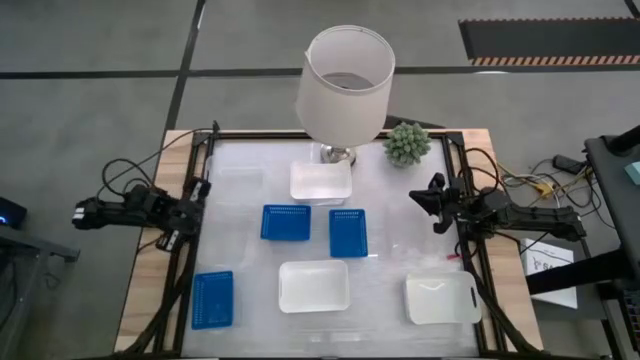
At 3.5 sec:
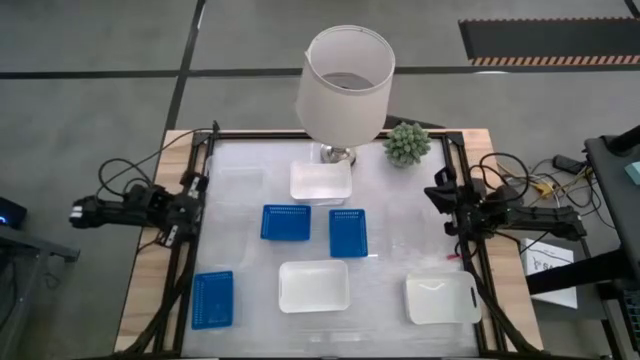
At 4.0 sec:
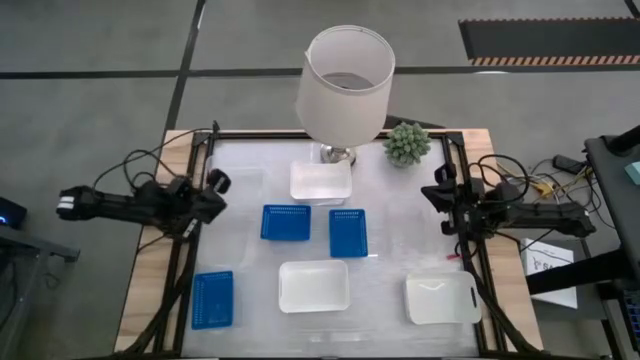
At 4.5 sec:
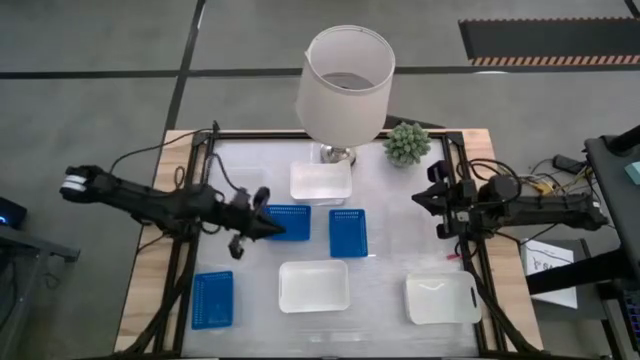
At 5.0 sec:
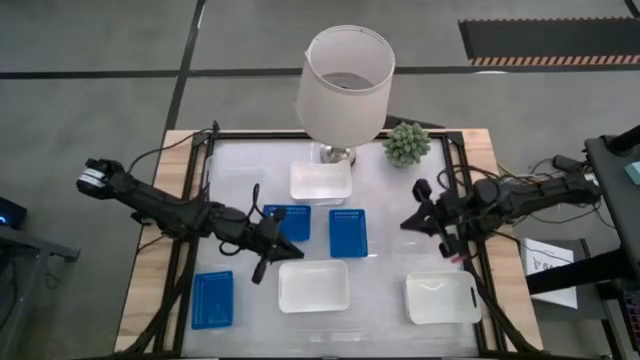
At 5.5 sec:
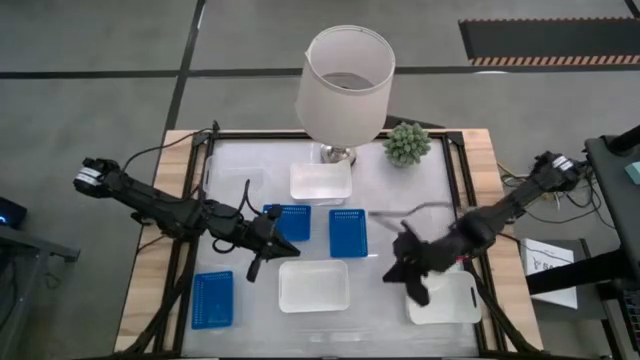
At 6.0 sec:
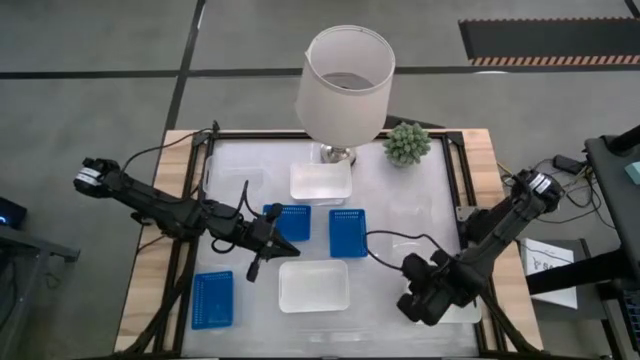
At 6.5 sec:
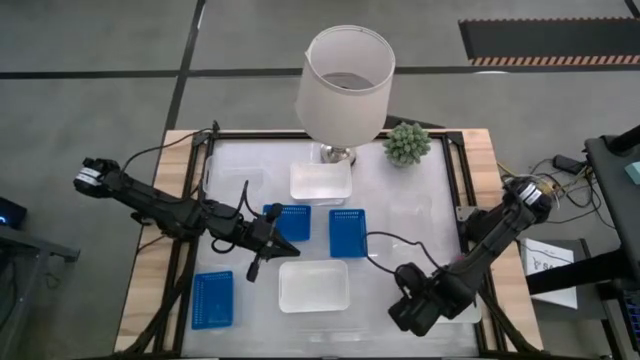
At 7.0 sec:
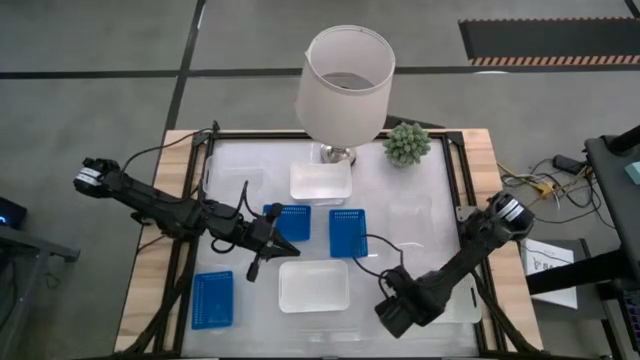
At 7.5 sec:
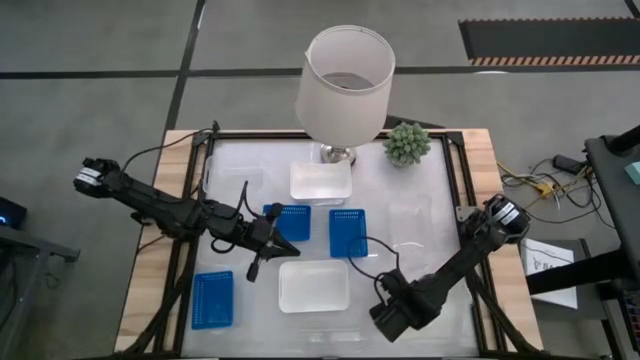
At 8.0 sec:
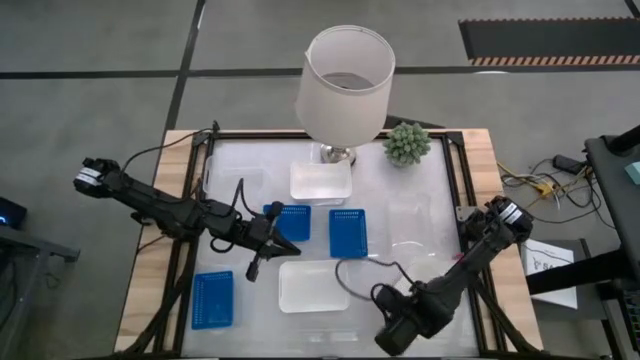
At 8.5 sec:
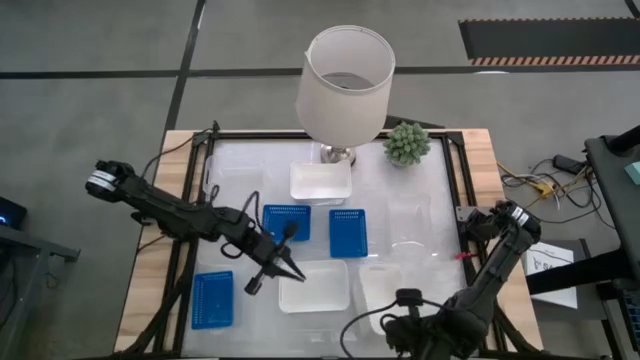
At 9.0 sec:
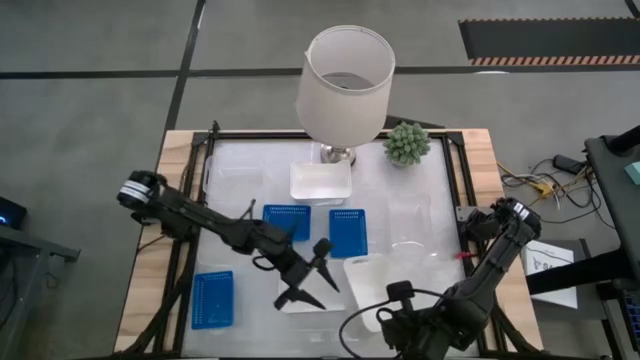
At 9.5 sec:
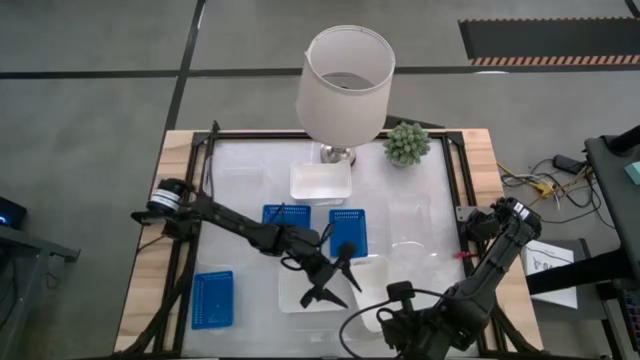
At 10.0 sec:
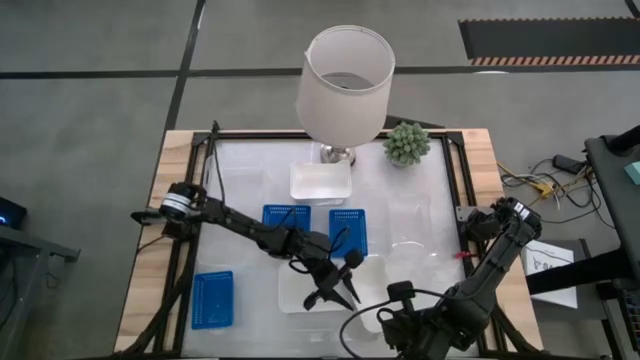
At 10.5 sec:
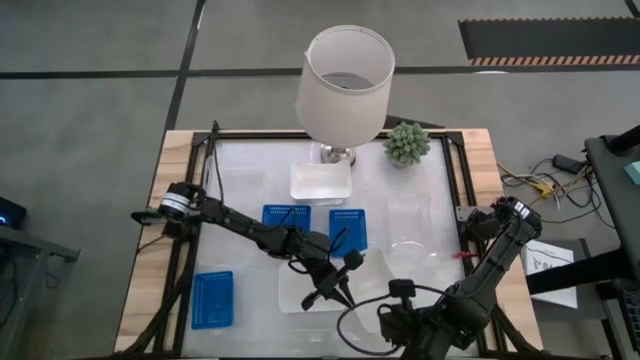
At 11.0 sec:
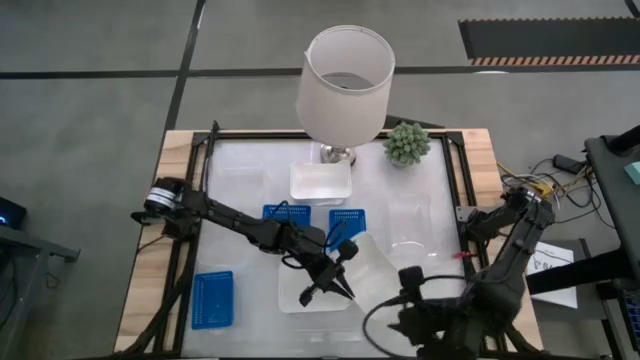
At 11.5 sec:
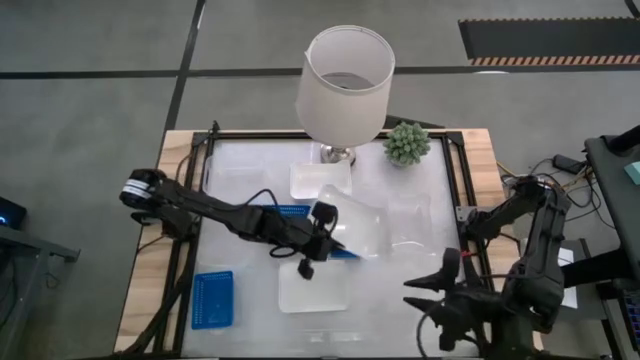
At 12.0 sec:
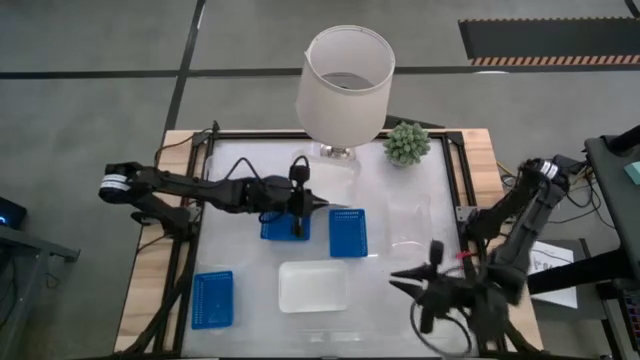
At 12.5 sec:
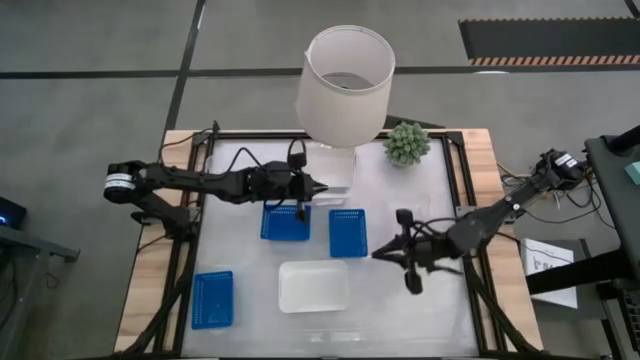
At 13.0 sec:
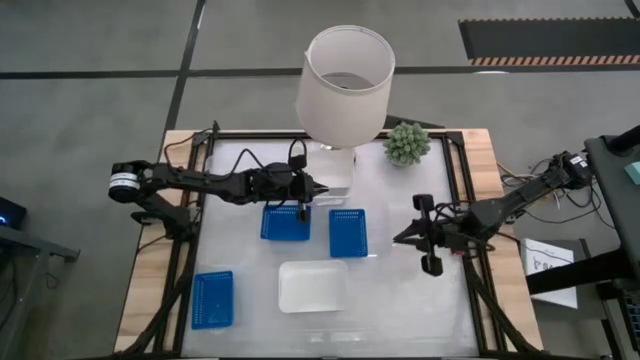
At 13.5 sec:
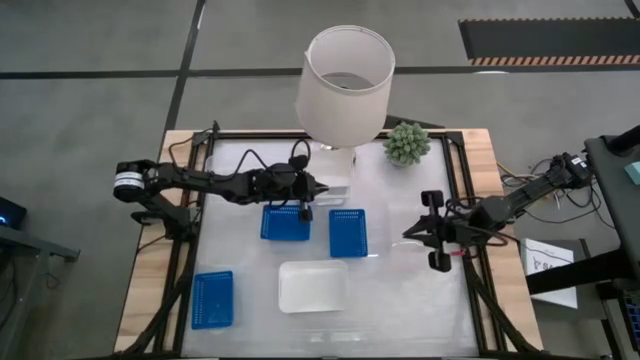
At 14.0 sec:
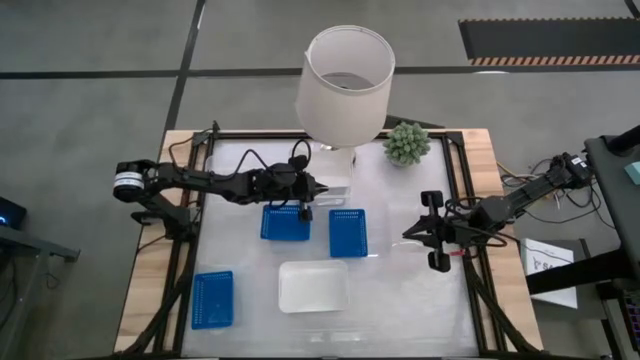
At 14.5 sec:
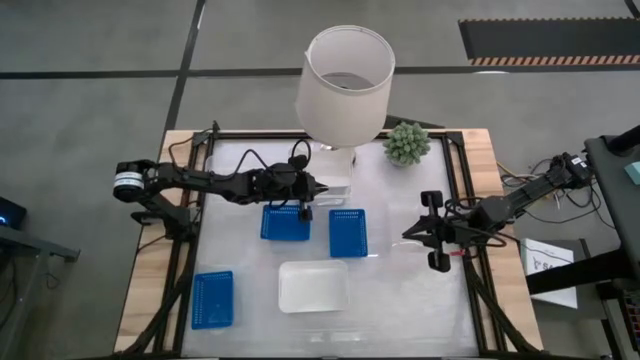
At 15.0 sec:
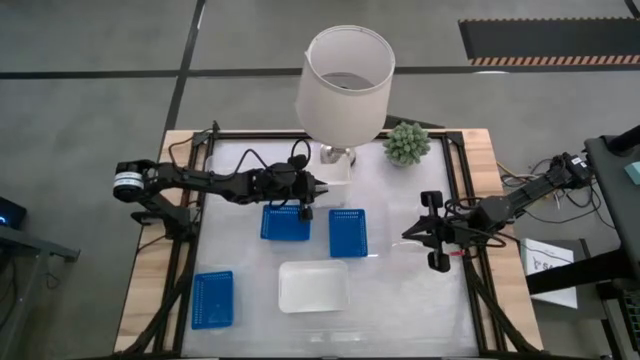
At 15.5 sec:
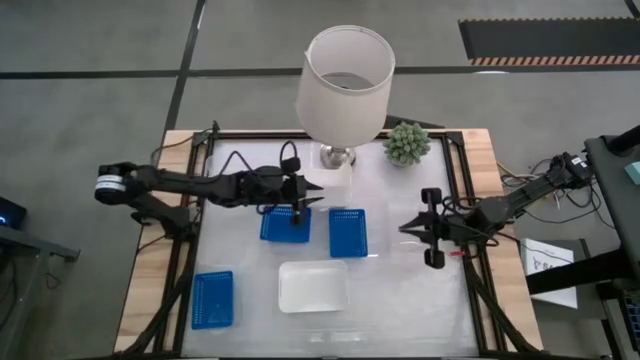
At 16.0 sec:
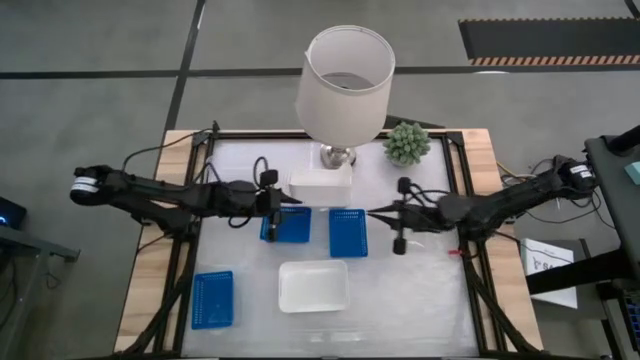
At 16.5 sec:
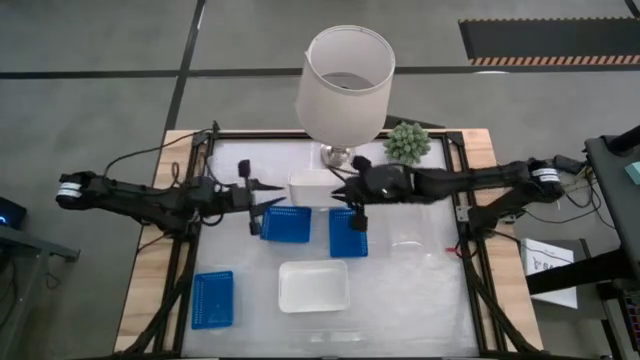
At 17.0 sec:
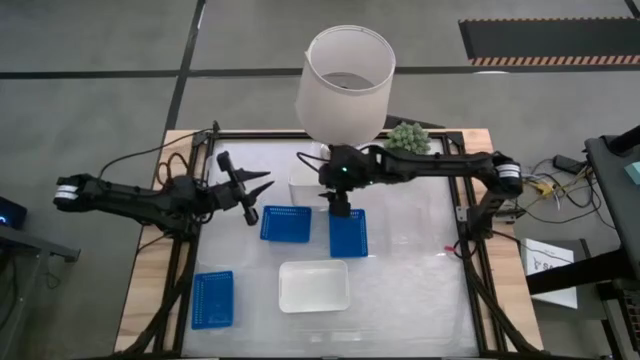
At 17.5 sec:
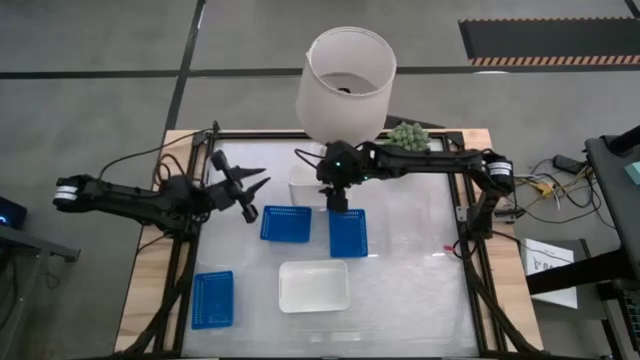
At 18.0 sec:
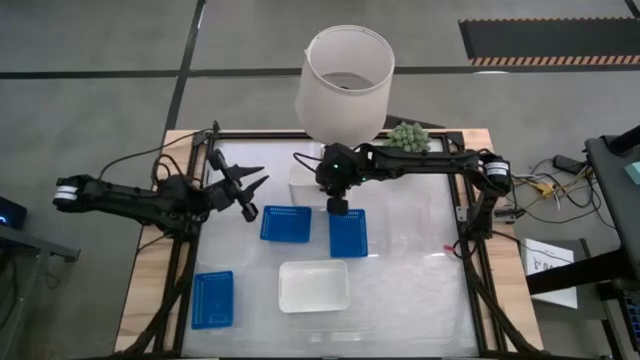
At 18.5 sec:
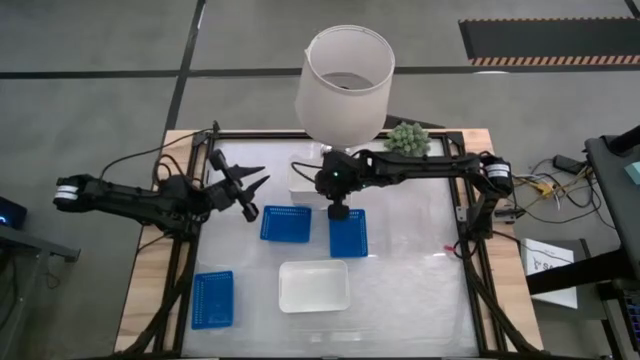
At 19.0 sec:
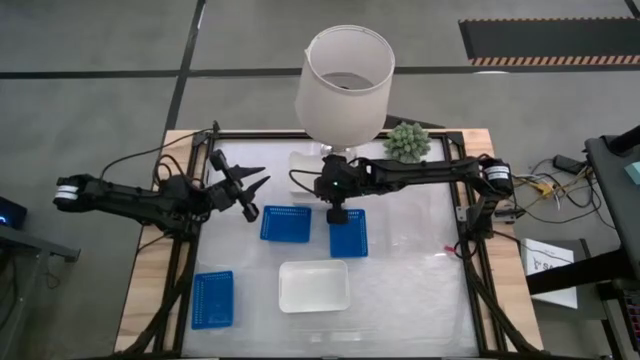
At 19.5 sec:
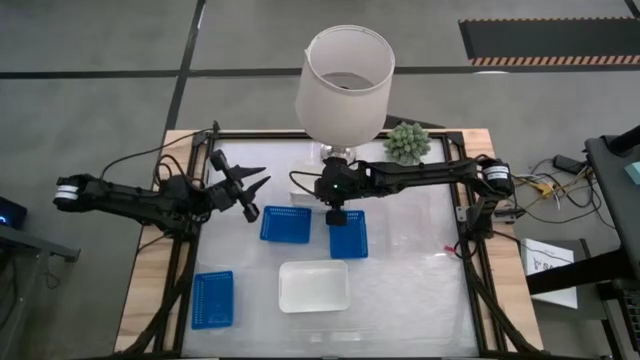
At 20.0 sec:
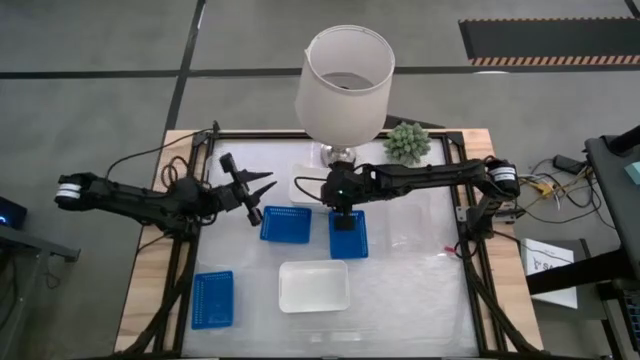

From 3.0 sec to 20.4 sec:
Stack the bottom right white bin into the top middle white bin
